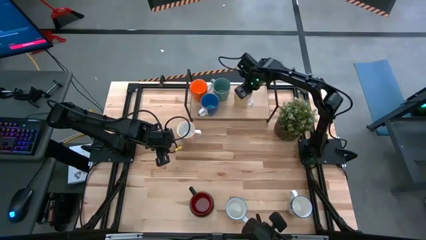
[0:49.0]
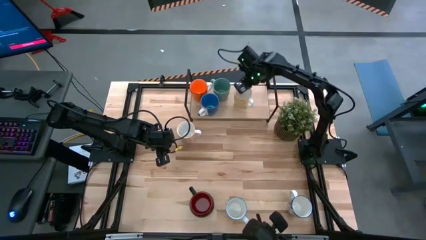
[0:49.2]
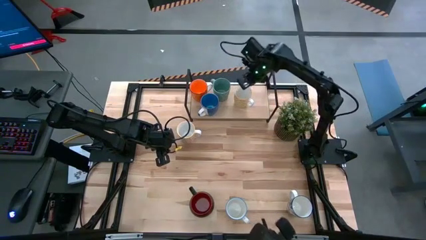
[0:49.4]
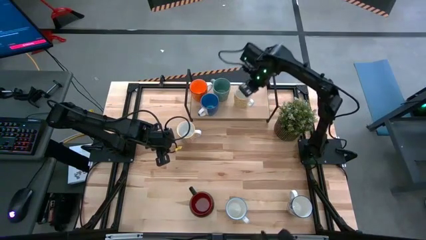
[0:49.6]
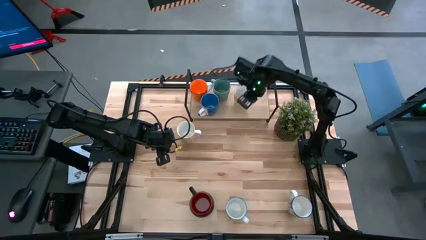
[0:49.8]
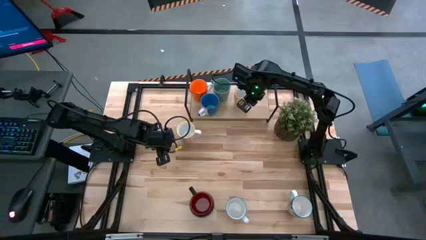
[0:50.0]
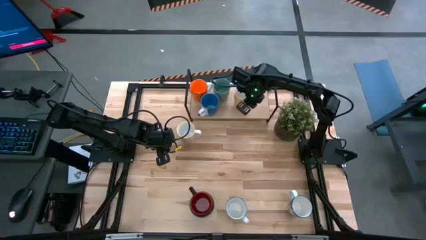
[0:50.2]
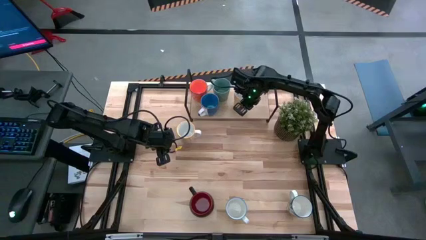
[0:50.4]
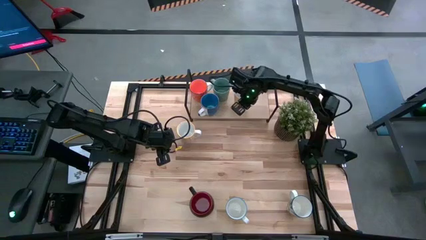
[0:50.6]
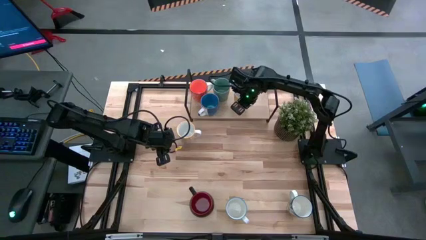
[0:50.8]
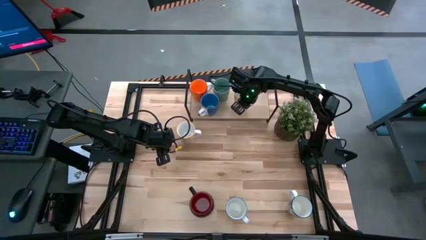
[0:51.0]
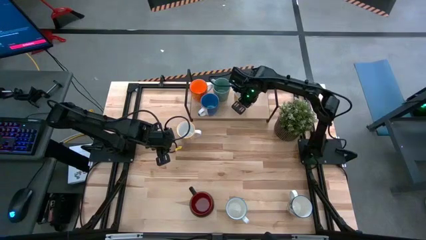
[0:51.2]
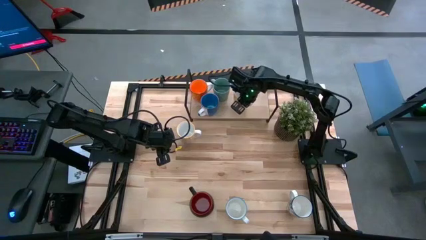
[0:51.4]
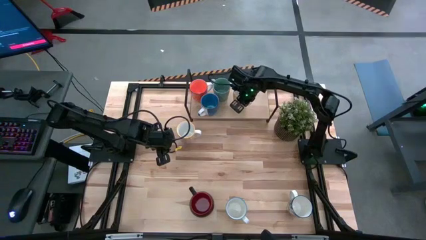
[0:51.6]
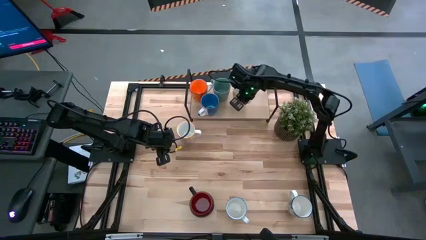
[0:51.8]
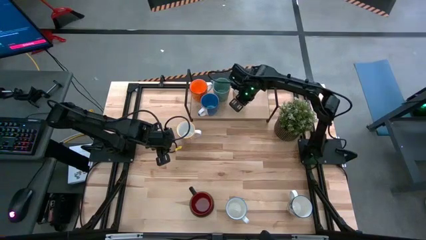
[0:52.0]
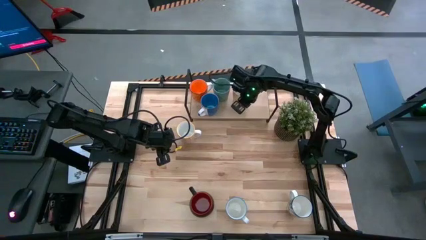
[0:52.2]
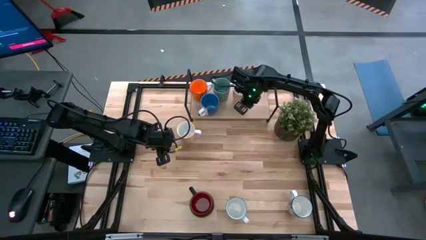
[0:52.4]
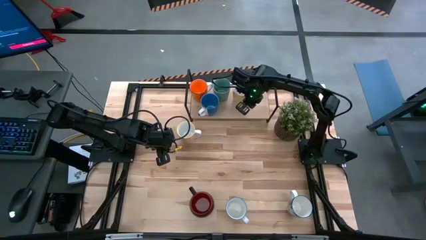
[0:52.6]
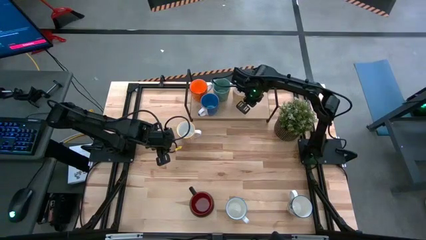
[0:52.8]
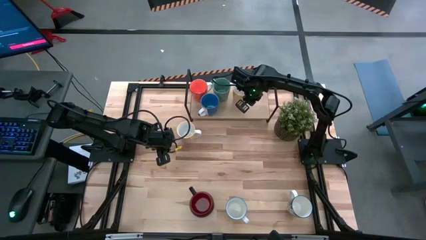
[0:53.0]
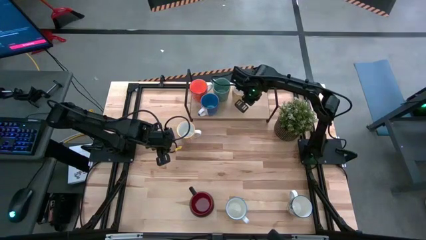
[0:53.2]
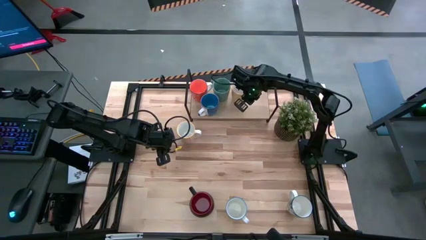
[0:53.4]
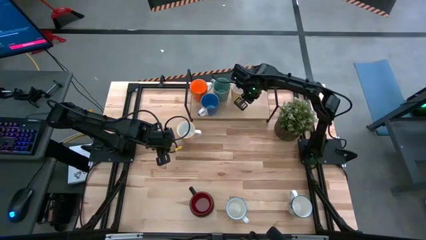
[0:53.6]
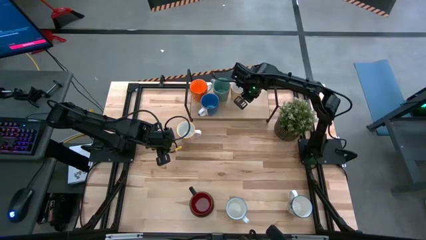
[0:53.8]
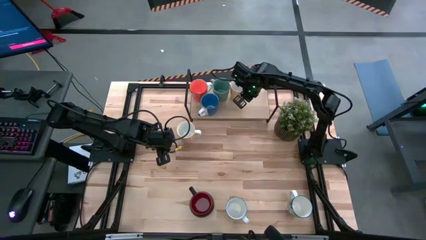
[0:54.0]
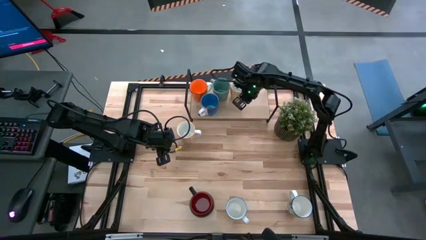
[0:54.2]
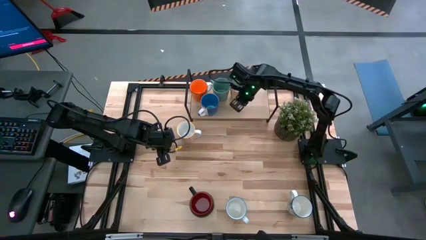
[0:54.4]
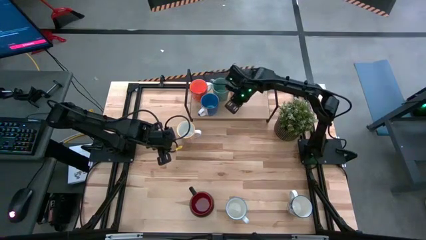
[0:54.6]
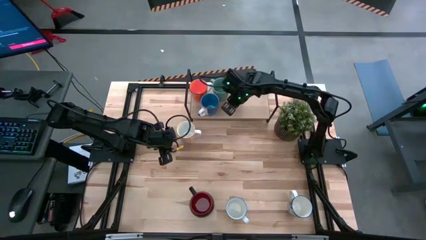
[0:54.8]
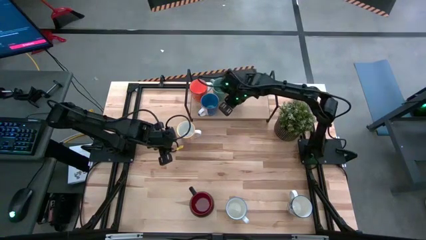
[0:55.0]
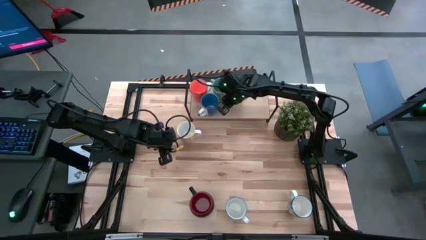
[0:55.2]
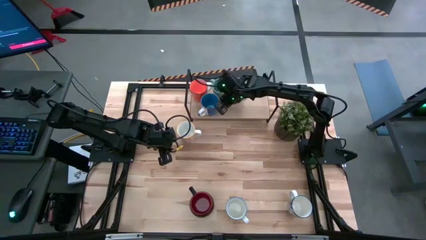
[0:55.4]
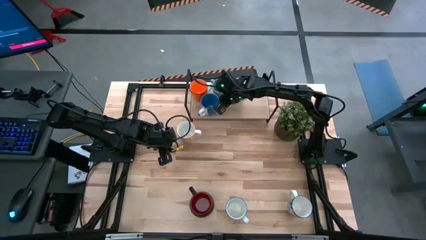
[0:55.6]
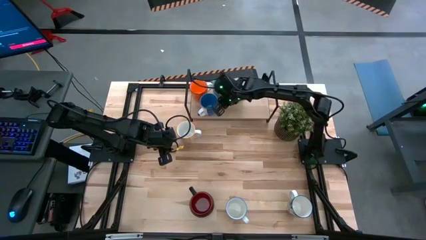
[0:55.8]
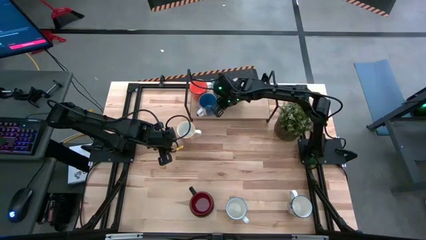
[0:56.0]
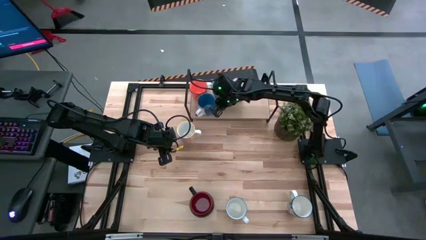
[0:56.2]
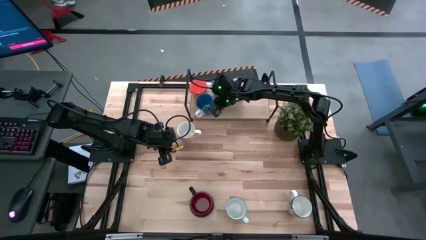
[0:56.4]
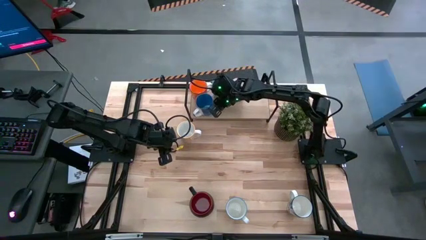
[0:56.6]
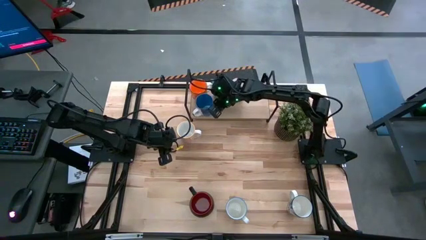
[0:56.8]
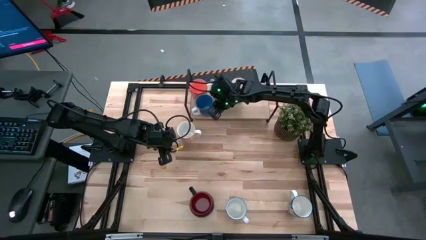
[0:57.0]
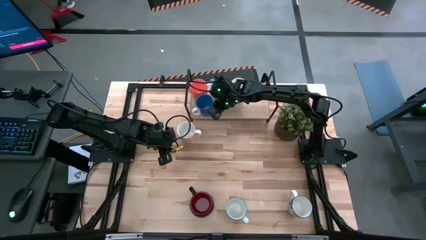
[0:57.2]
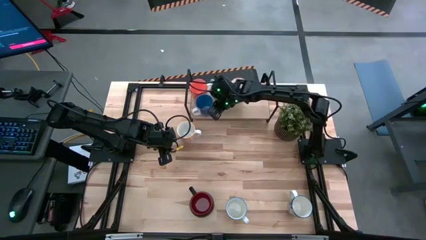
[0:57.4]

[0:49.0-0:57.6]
Task: Place coffee mugs
Adjust the mugs on the shelf

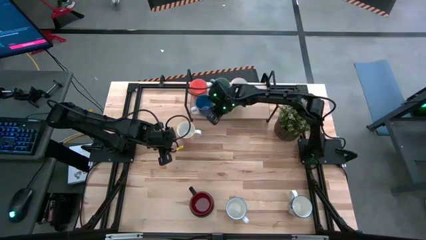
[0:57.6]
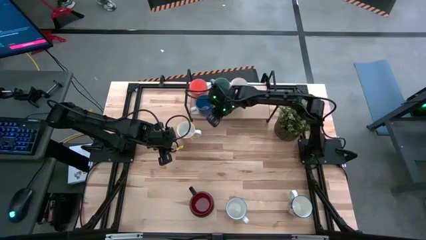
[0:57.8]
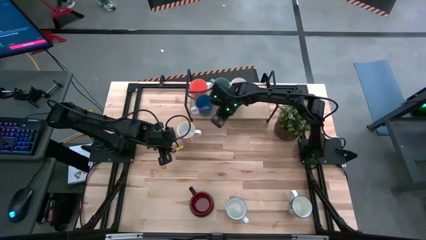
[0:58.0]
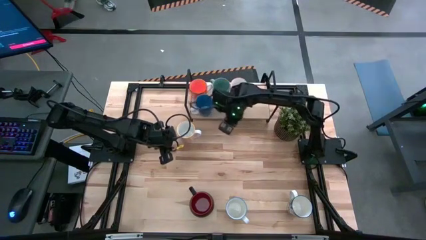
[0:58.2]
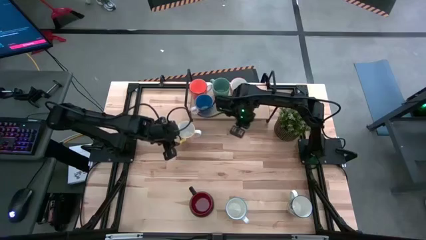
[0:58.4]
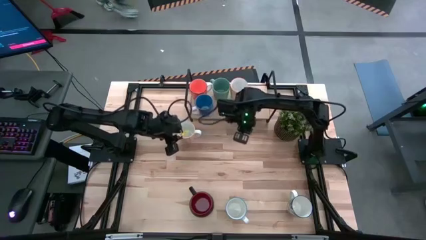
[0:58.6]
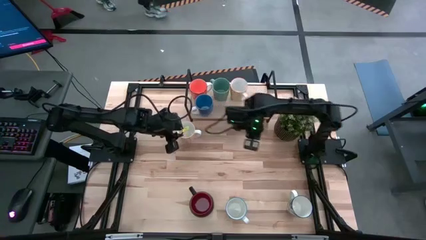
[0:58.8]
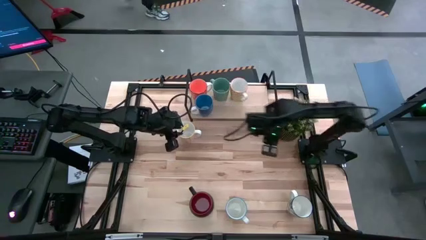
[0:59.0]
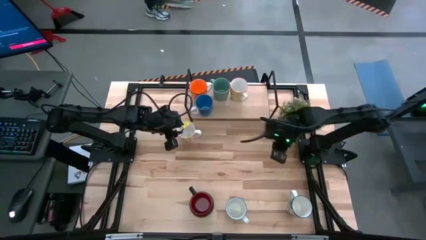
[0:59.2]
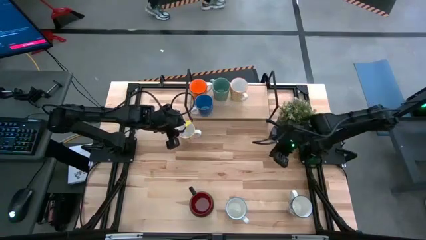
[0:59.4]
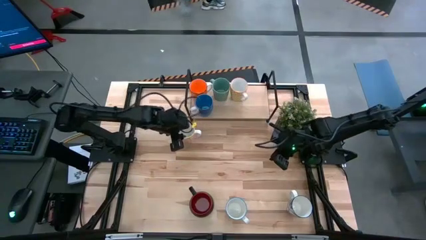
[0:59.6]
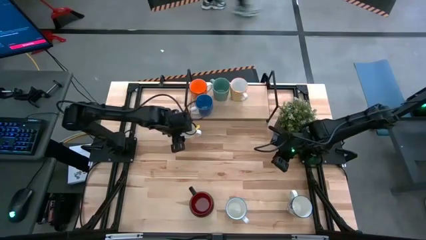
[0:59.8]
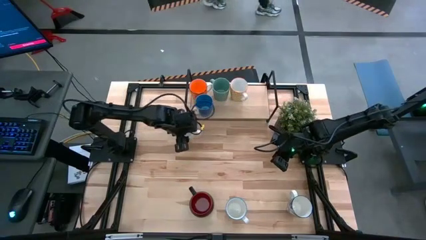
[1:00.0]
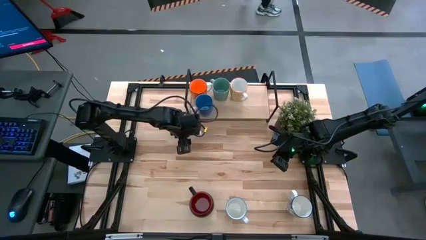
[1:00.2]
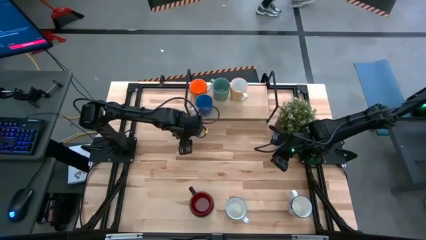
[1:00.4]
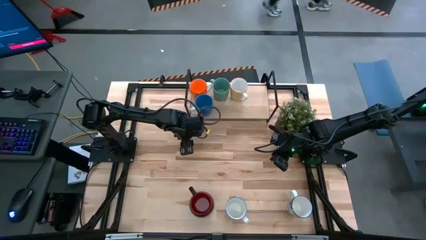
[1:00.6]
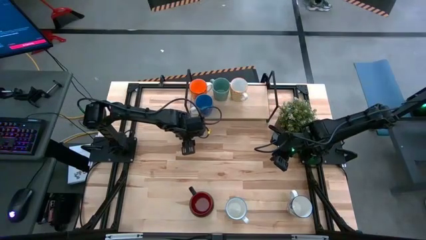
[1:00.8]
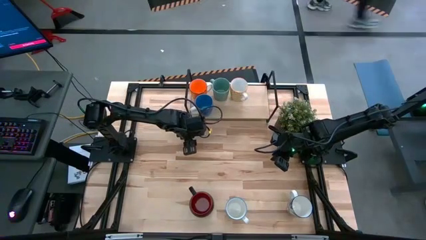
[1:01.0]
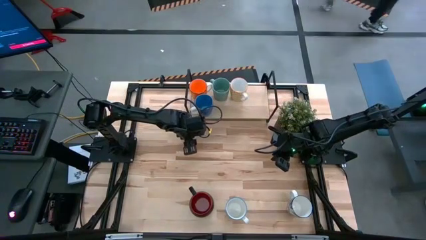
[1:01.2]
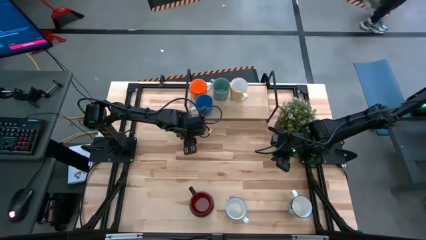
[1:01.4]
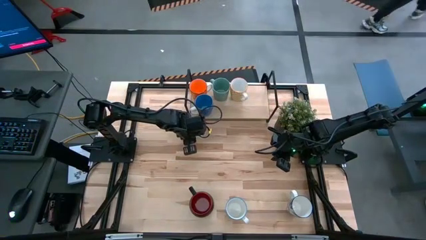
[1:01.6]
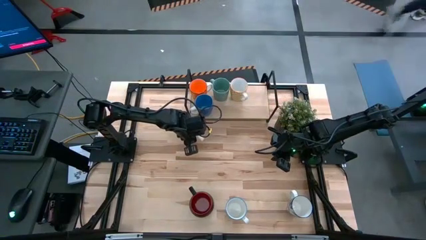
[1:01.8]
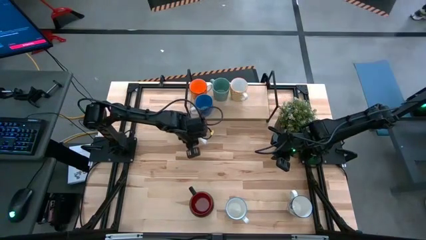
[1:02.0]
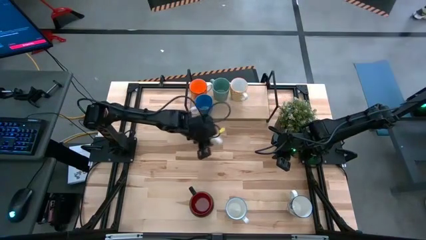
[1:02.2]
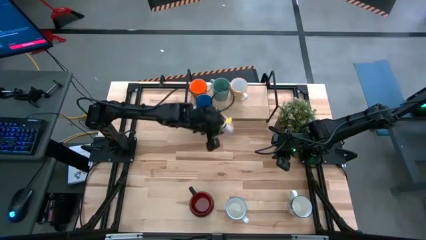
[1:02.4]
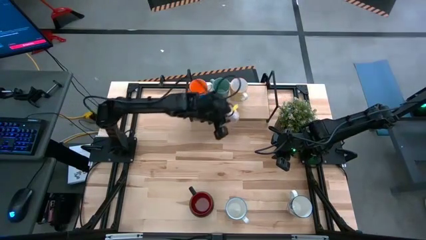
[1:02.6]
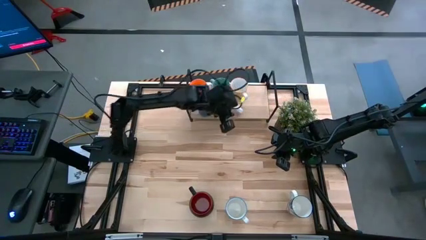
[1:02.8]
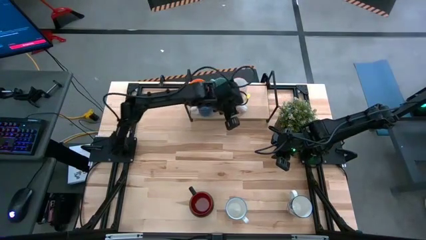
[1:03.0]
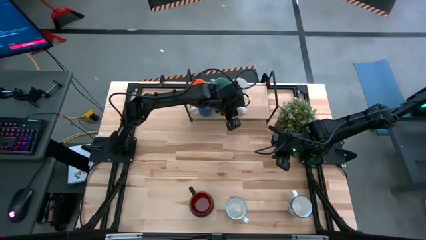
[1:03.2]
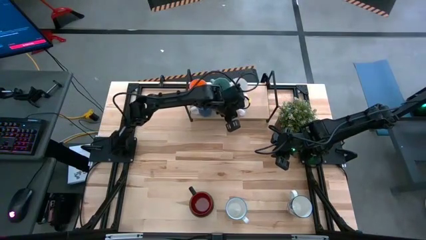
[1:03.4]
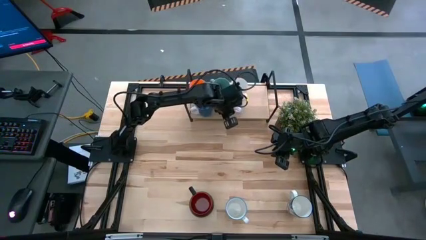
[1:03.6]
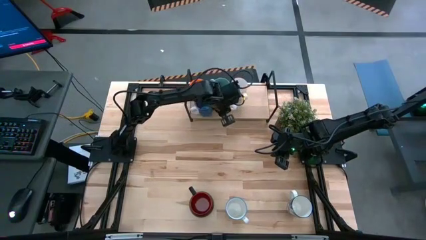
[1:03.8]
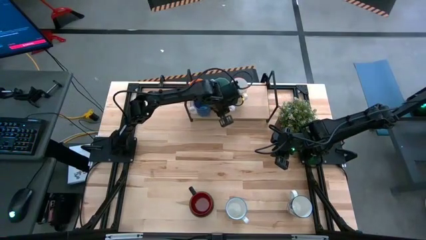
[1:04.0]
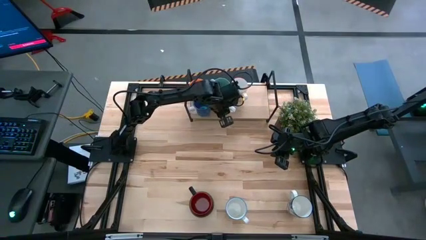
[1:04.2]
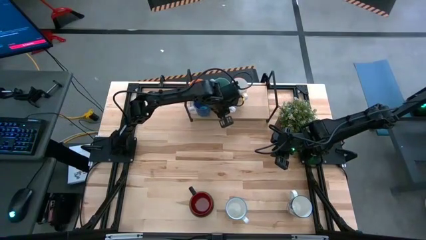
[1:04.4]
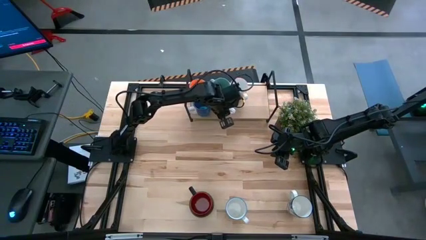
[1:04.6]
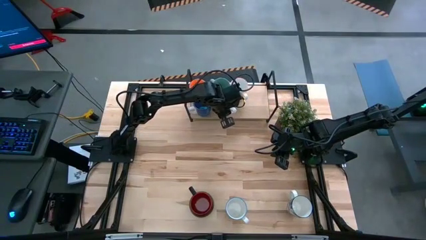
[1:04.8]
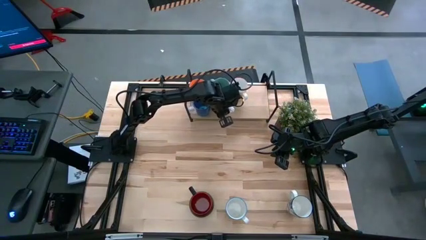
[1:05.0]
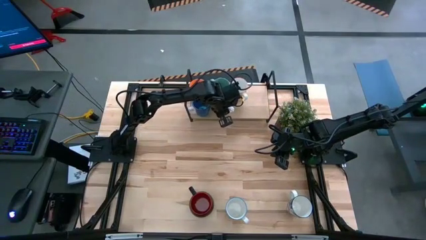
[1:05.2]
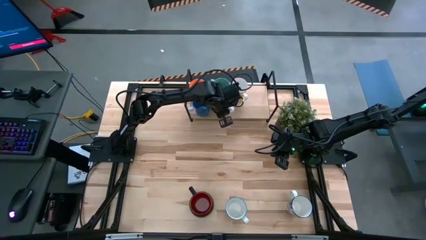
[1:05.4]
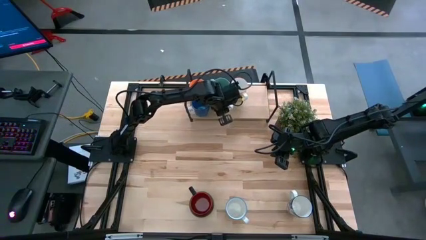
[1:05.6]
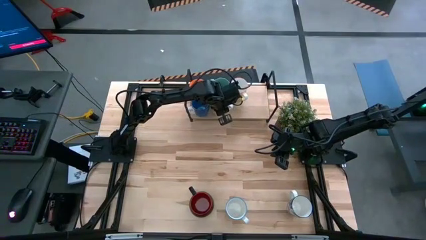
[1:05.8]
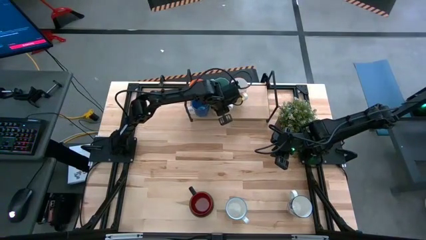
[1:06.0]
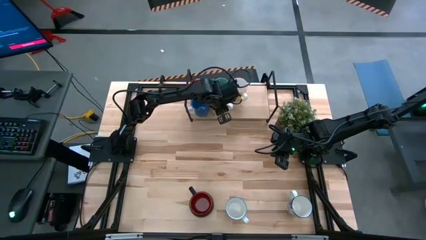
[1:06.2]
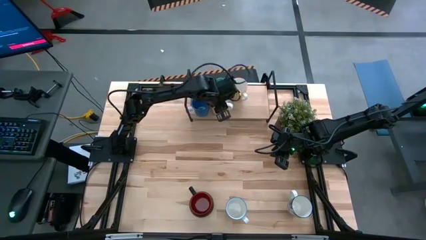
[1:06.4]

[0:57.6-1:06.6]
Put the yellow patterned mug on the shelf
